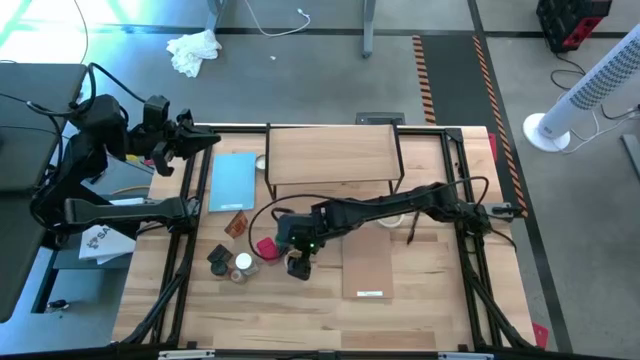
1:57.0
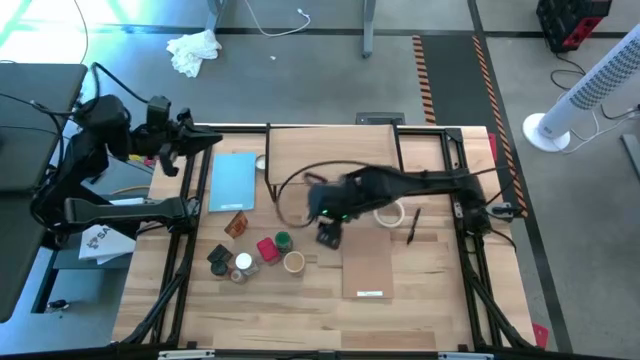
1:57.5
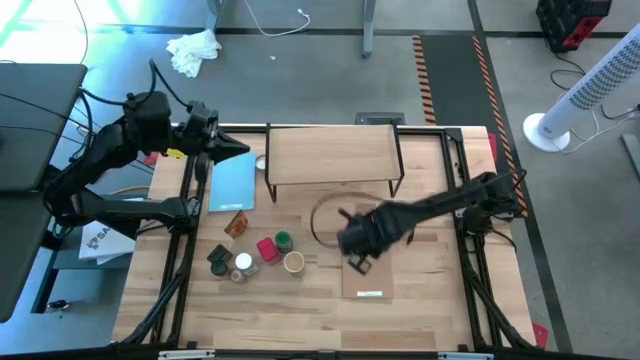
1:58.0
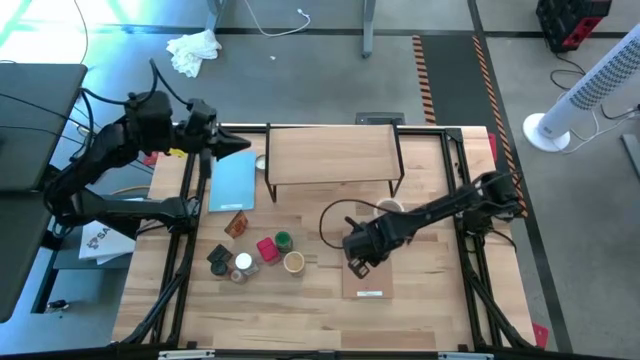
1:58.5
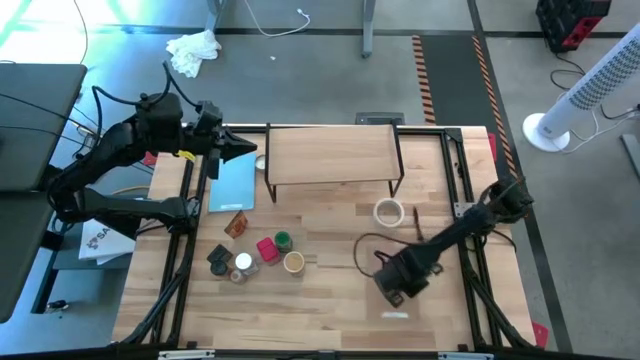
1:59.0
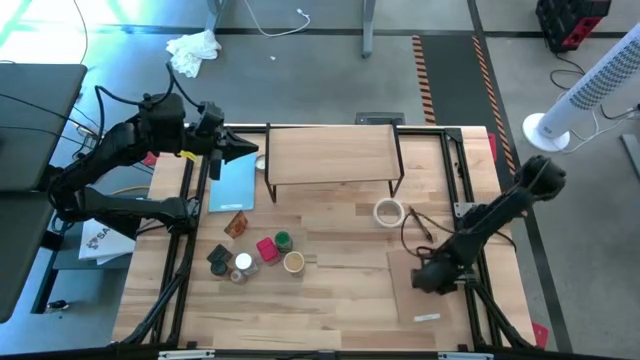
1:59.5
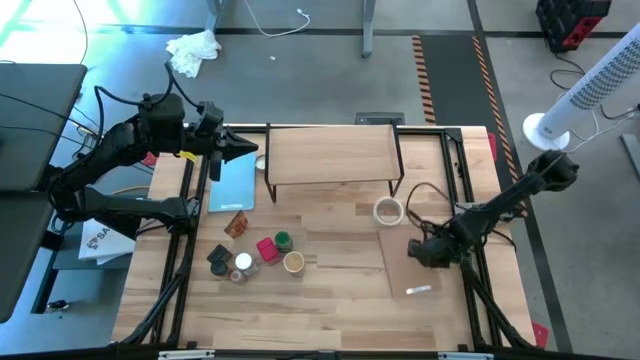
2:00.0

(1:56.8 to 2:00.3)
Task: Shelf spices
Move the brown cardboard to the middle right of the table

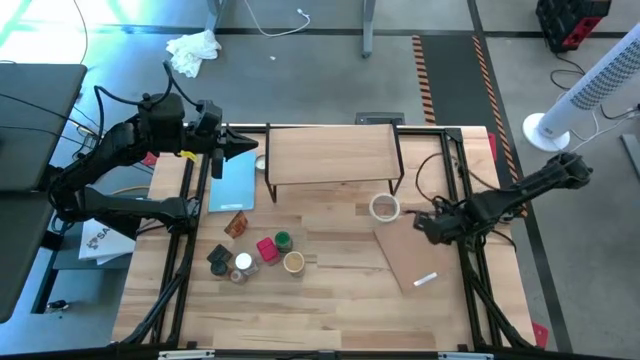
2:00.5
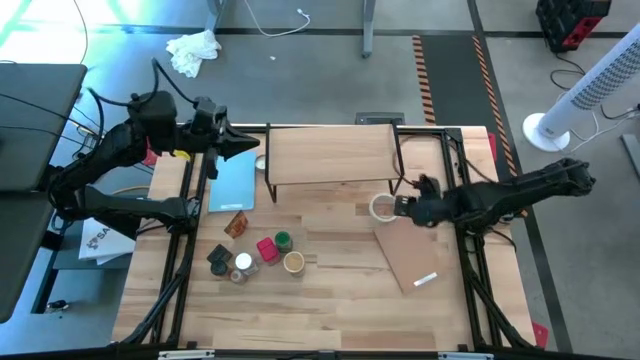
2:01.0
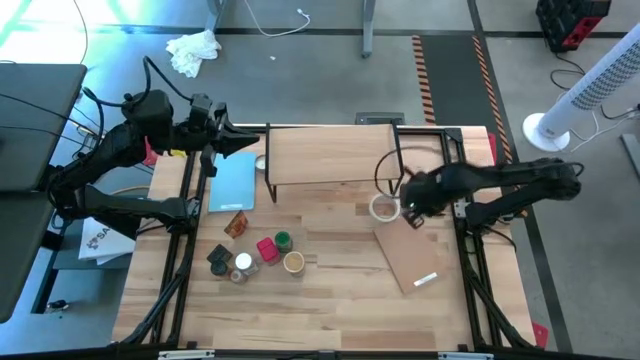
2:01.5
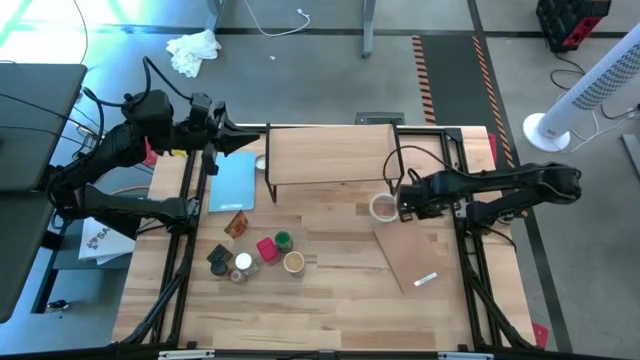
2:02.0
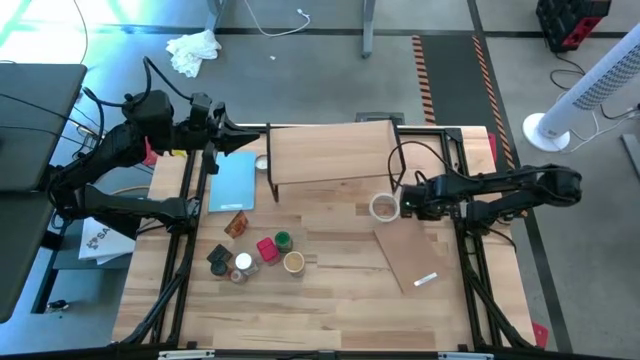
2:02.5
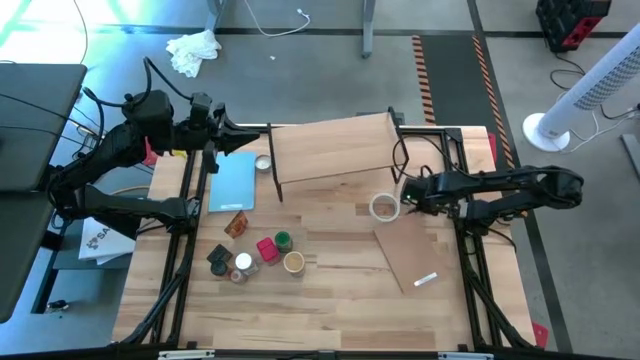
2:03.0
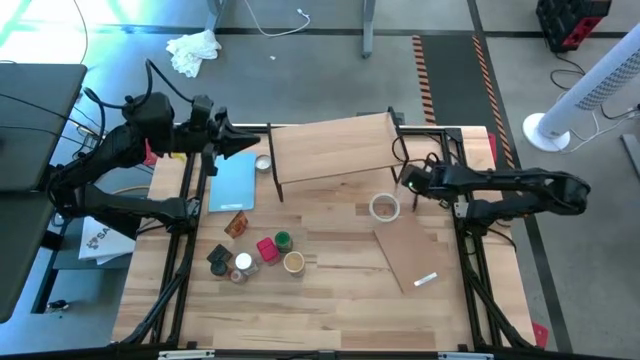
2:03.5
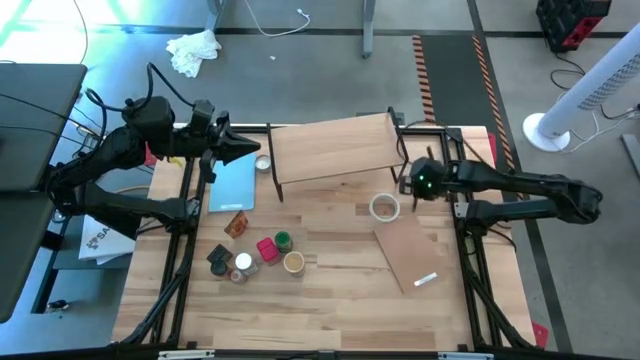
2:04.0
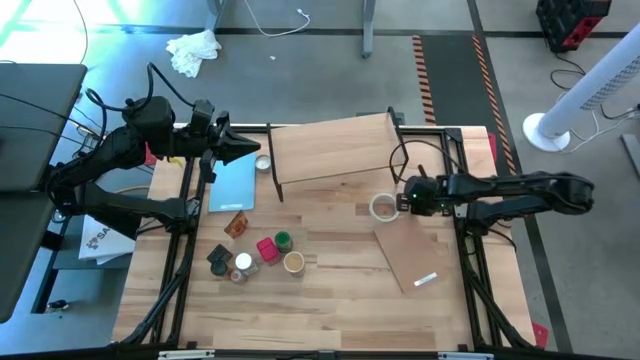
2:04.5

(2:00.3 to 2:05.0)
Move the black pen to the top right of the table

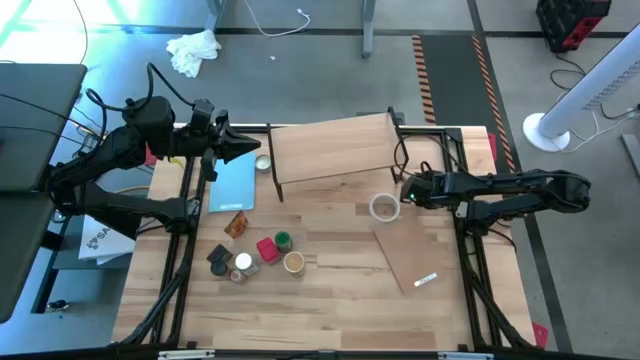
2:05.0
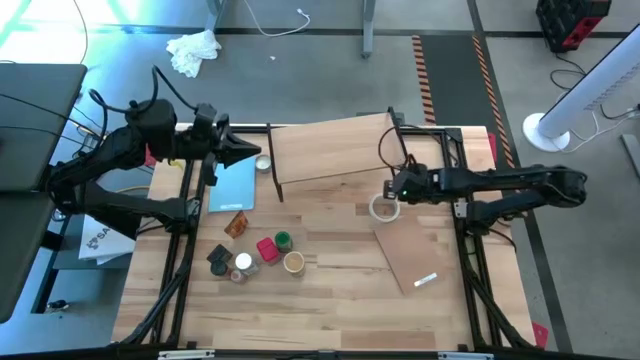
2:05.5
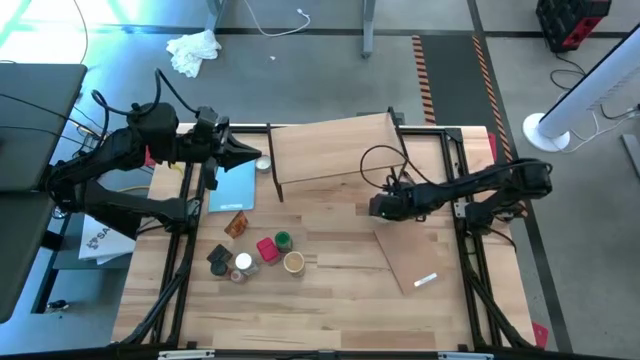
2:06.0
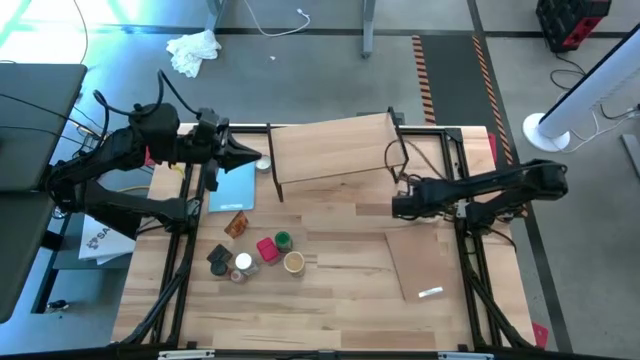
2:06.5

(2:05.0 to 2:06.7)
Move the white tape to the middle right of the table

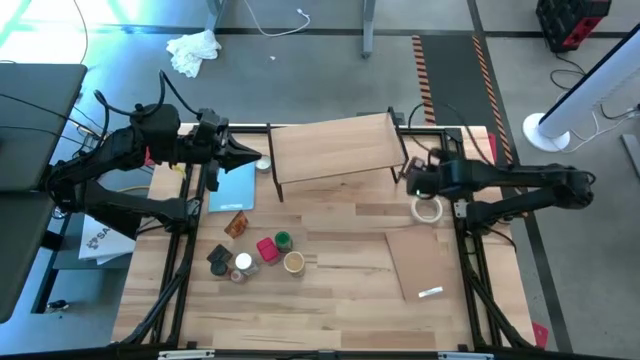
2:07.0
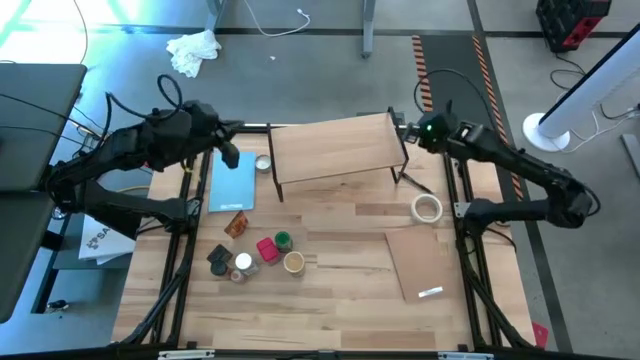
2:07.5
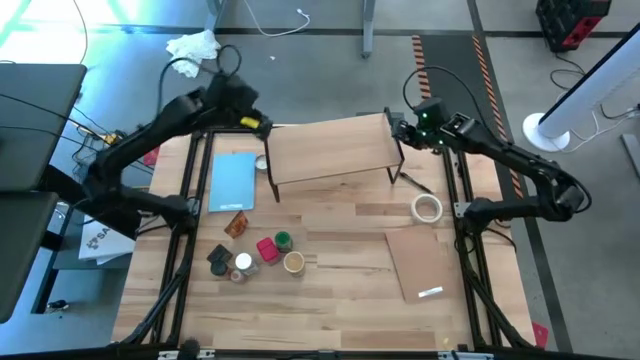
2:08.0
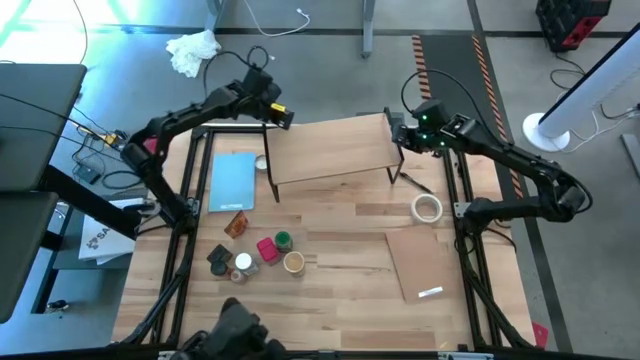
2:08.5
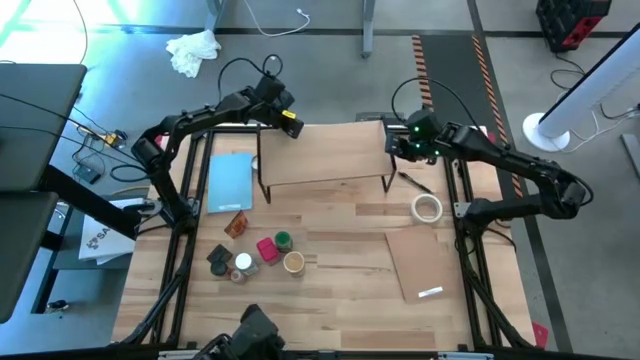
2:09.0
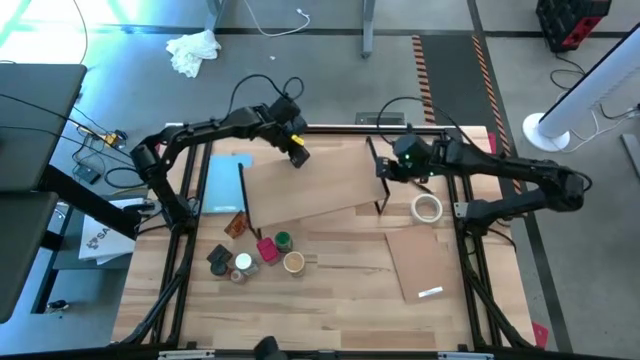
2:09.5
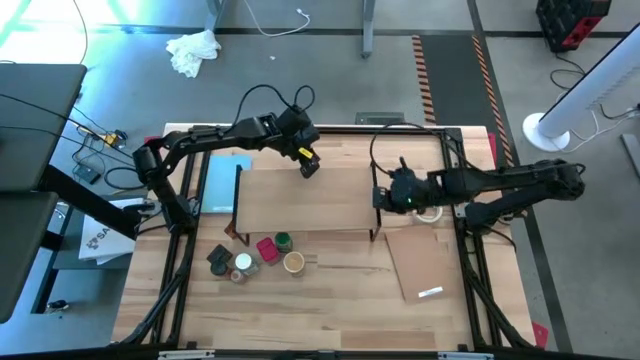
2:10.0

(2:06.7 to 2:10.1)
Move the shelf to the center of the table

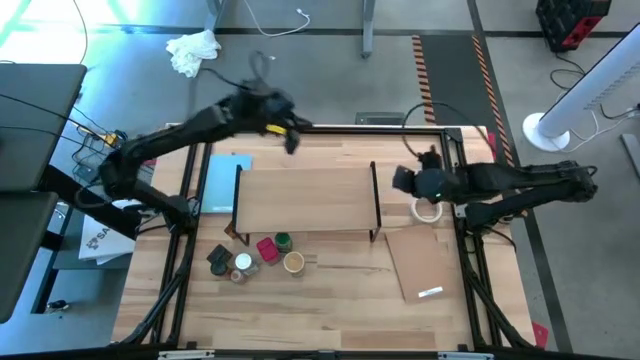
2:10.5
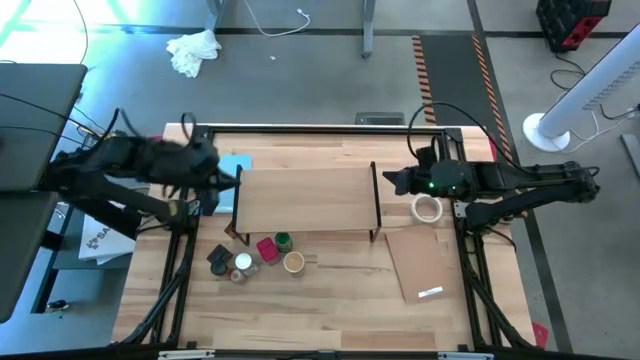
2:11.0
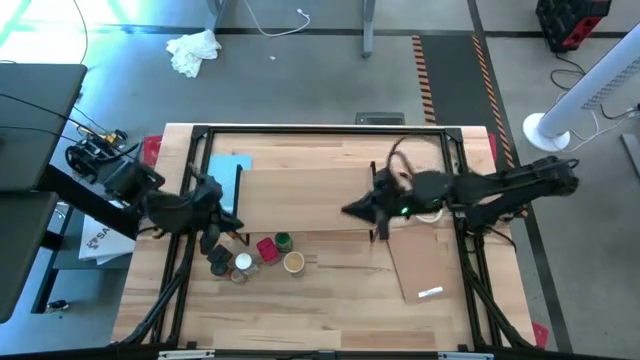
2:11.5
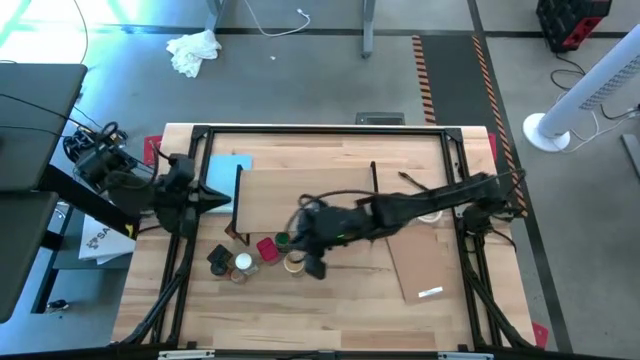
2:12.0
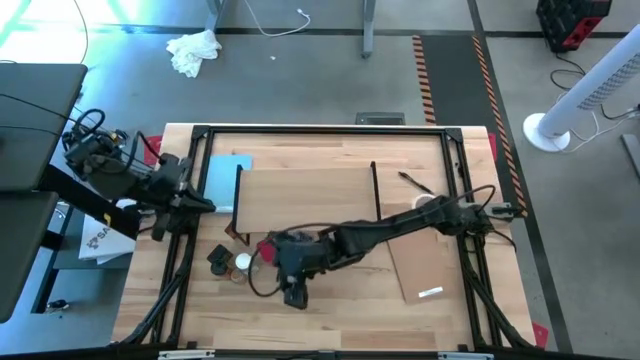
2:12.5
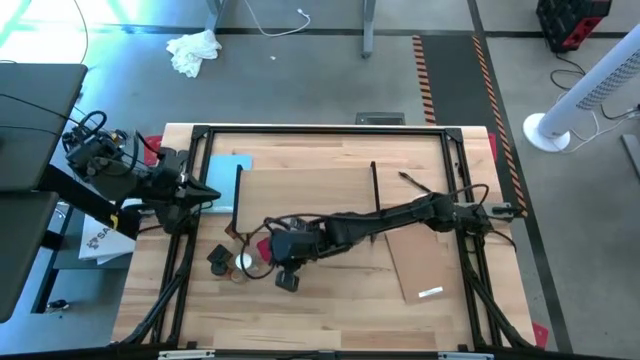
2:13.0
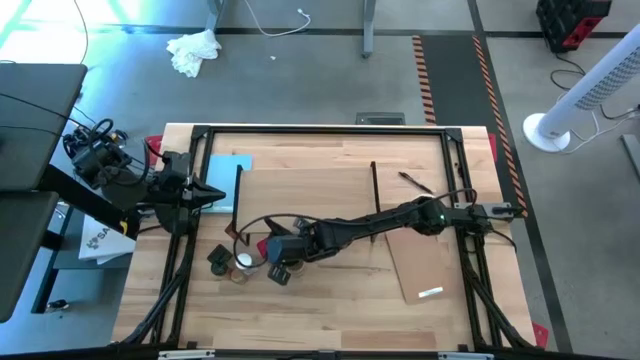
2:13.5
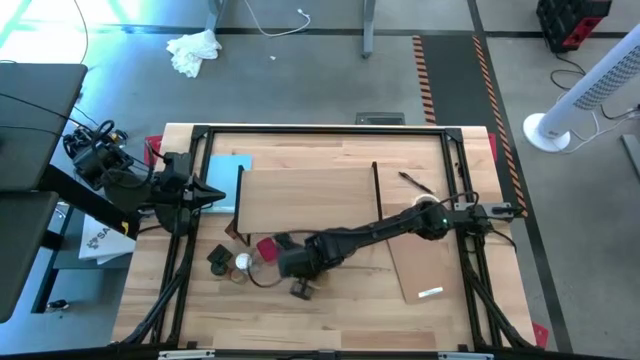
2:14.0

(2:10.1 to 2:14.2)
Move the brown seasoning bottle to the bottom right of the table
